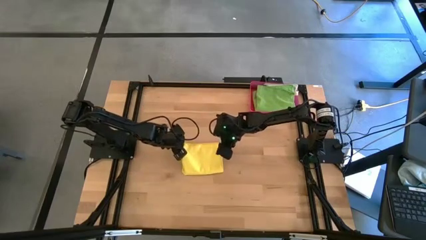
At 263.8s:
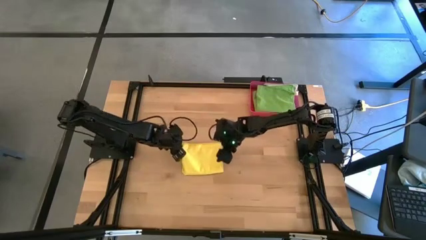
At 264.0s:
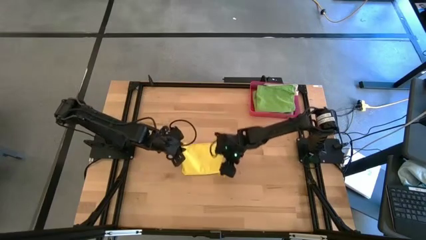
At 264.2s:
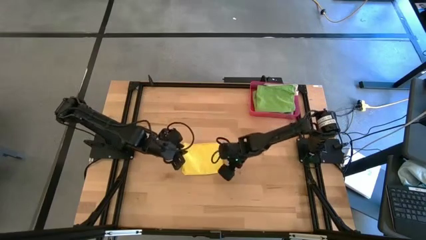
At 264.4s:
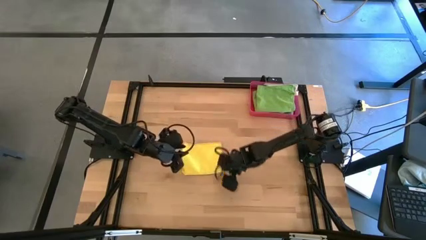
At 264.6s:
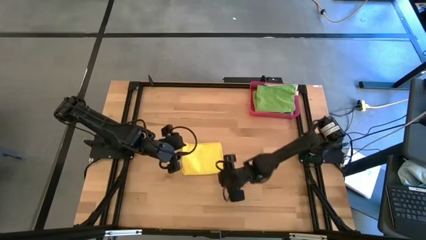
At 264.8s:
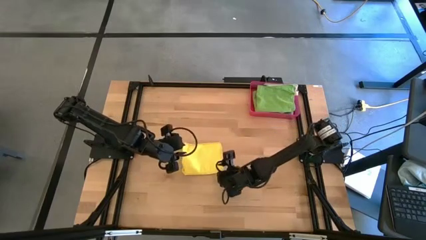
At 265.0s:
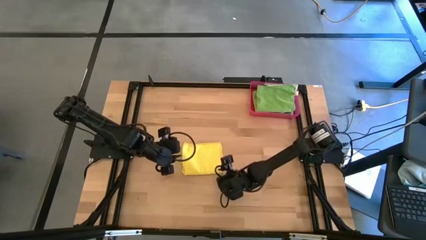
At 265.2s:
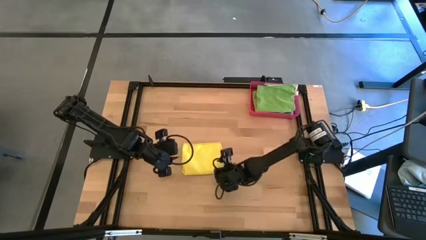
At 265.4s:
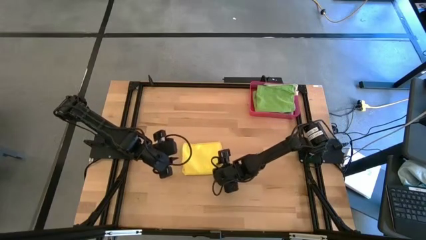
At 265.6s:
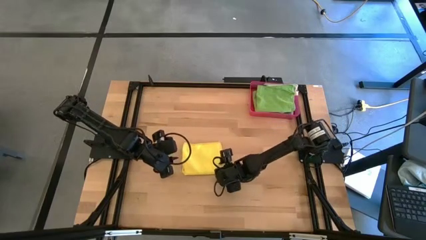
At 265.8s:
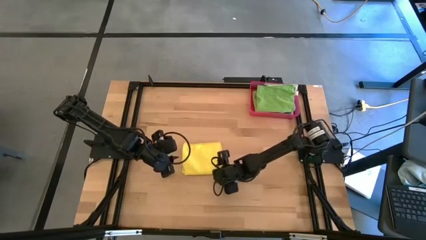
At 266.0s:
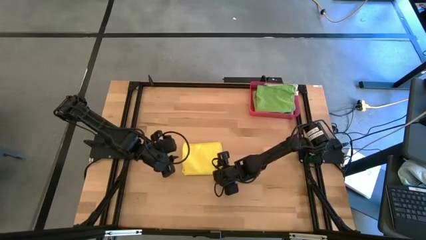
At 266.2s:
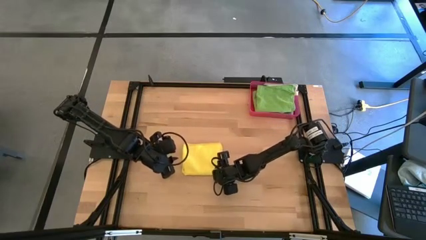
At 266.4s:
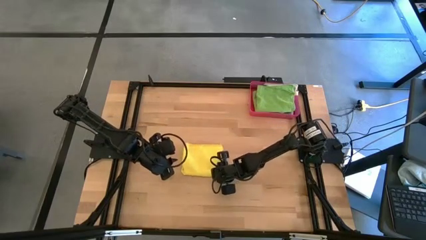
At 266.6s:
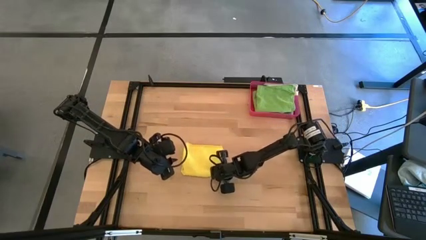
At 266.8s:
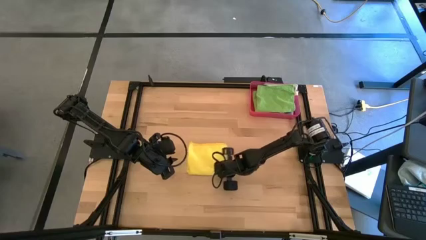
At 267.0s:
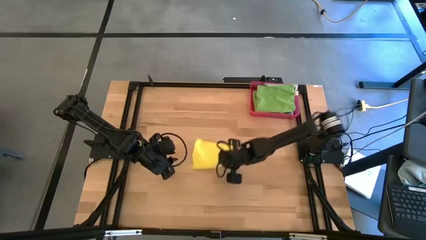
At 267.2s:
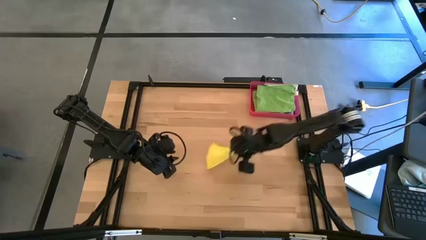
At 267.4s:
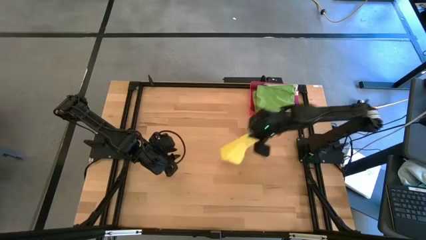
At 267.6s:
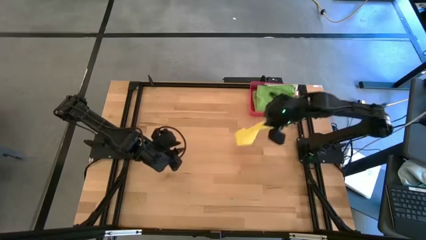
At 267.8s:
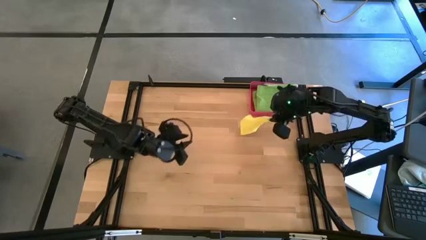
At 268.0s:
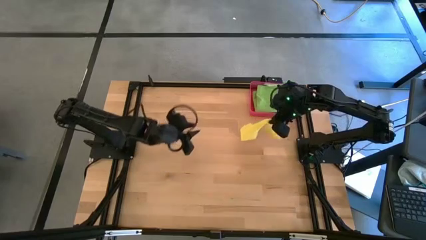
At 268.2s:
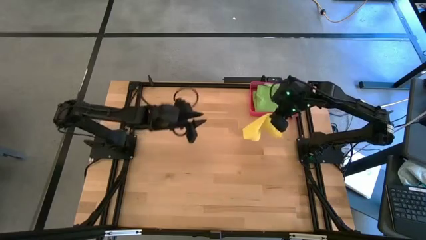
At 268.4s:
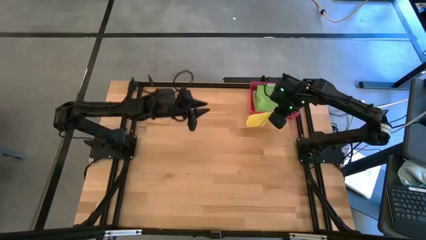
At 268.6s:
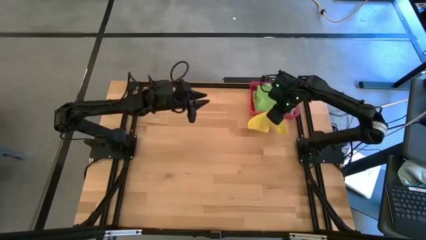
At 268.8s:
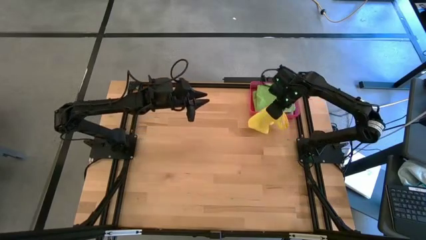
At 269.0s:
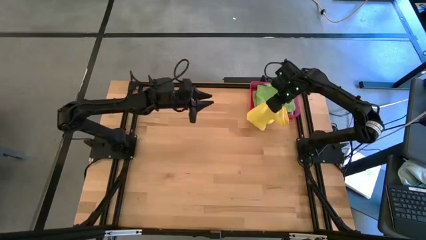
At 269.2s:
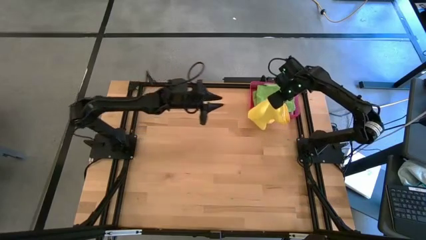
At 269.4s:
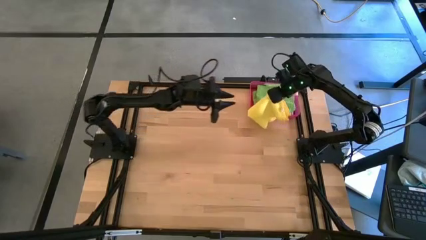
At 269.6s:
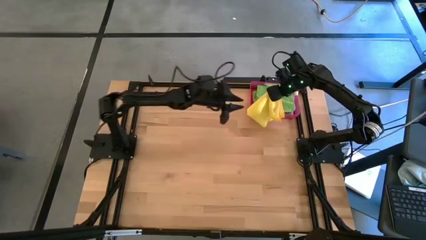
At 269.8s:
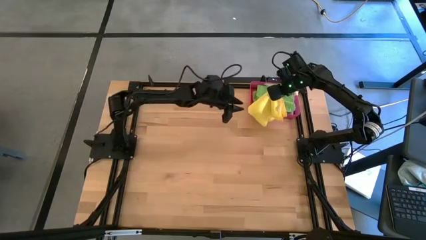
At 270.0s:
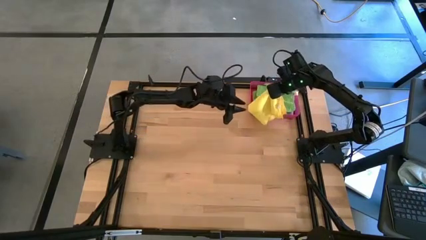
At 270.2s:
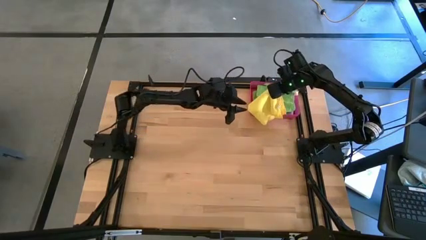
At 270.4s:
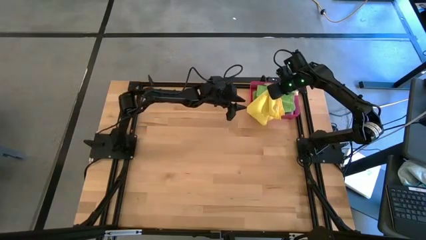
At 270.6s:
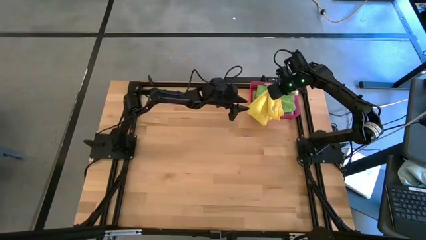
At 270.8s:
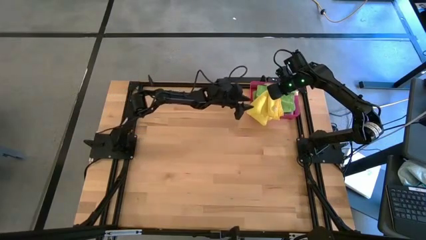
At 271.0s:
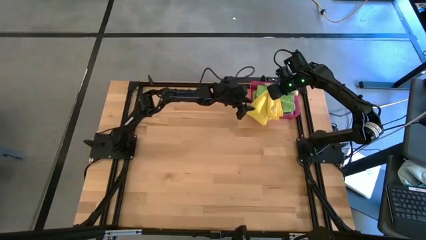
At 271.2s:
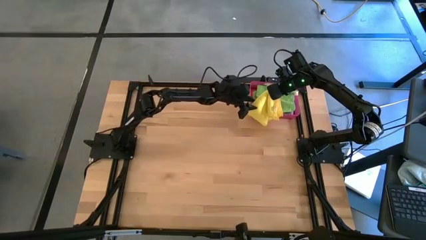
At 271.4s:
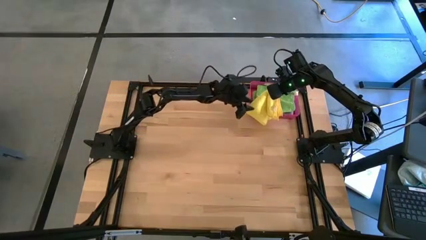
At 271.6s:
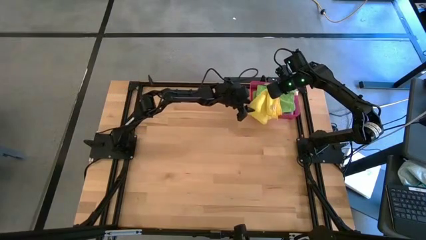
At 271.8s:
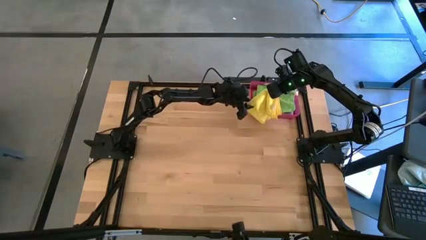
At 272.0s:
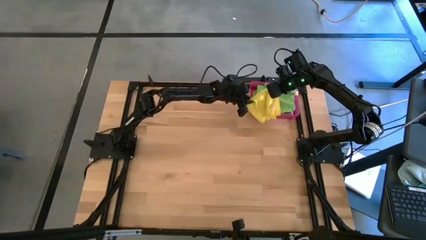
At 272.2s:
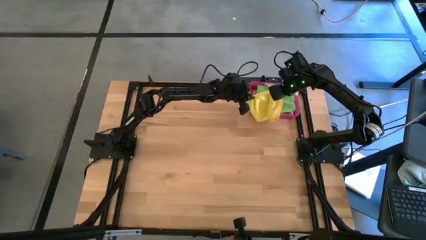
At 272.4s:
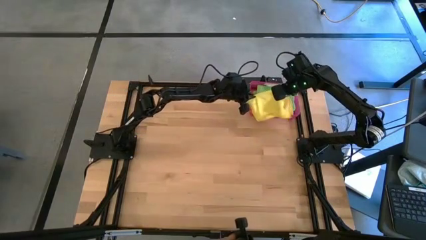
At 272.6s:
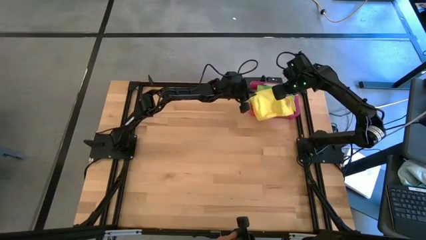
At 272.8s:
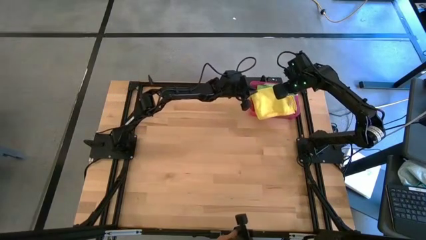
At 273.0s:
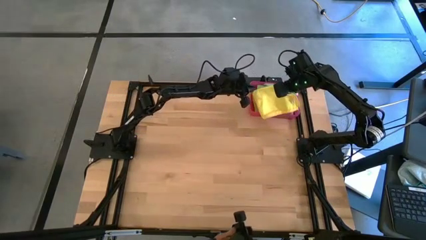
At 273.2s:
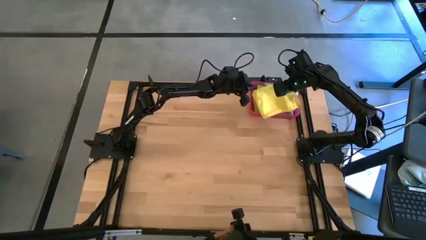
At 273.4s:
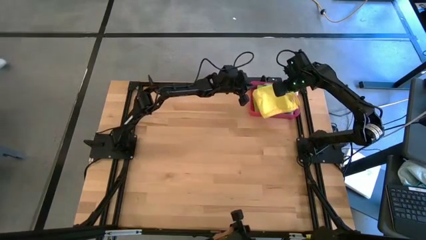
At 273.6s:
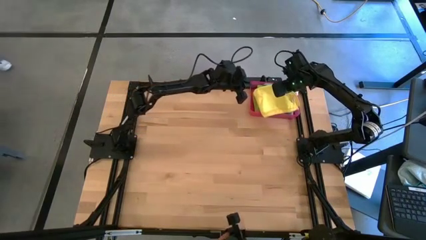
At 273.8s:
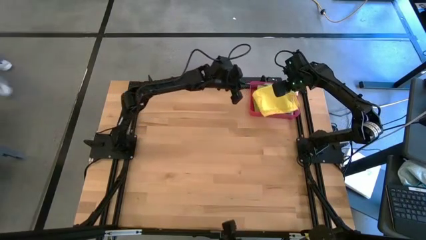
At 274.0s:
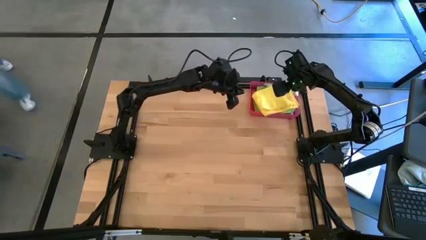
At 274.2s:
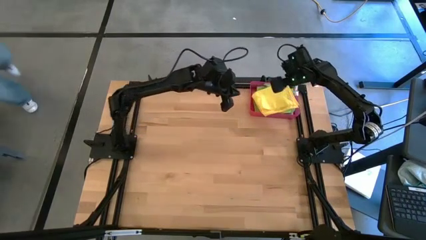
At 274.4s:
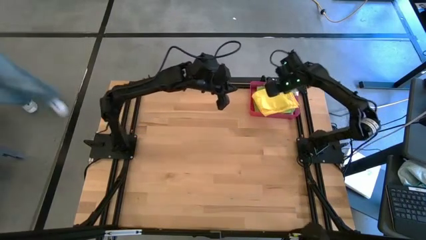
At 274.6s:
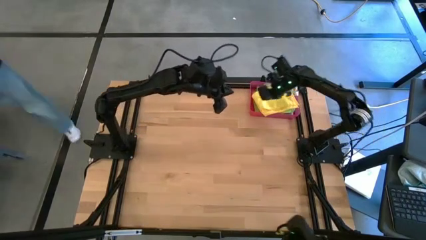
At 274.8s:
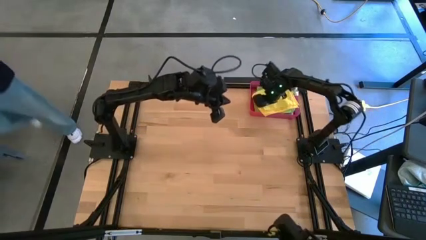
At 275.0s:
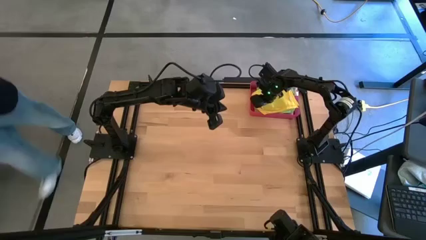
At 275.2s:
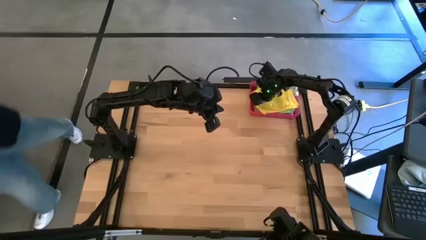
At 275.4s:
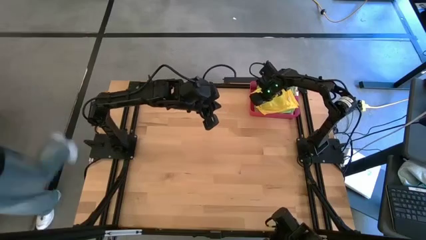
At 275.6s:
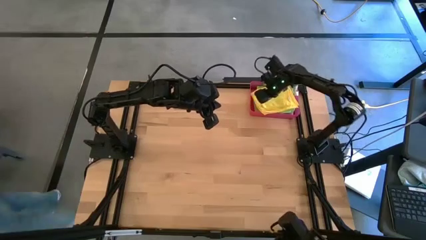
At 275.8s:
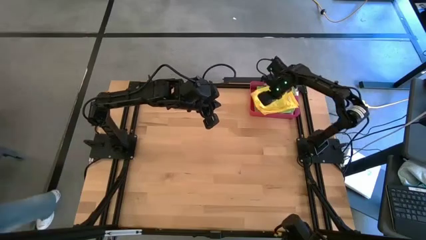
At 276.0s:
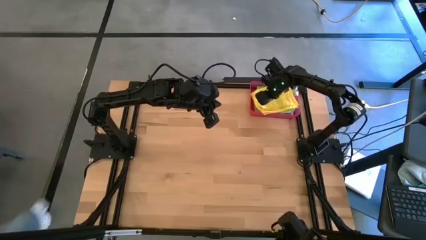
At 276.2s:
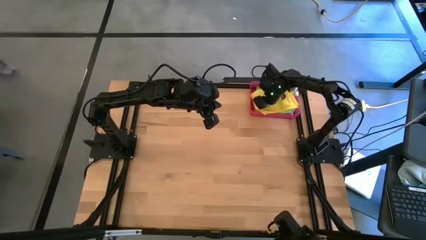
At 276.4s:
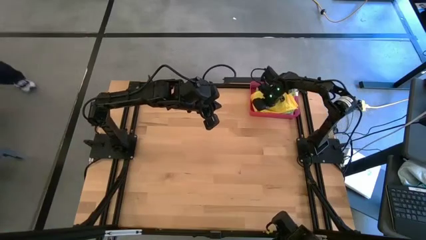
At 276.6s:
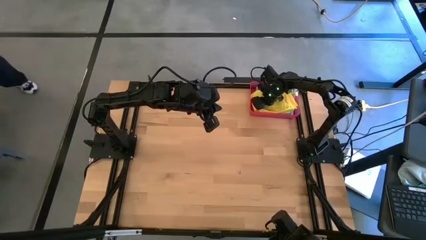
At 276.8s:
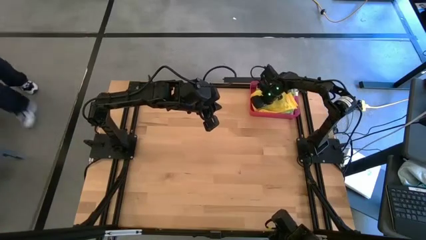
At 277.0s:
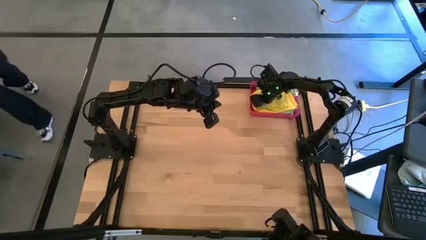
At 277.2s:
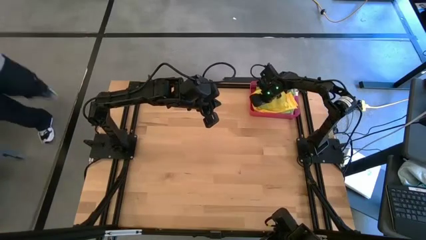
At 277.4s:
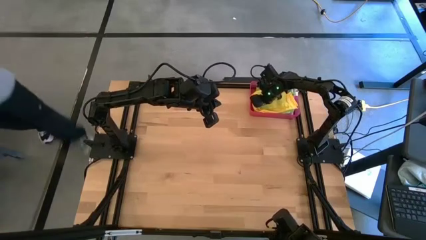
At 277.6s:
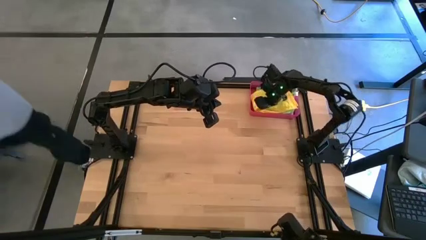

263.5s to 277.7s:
Task: Fold microfiber towels
Put the yellow towel into the red bin

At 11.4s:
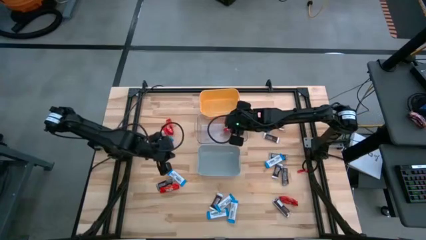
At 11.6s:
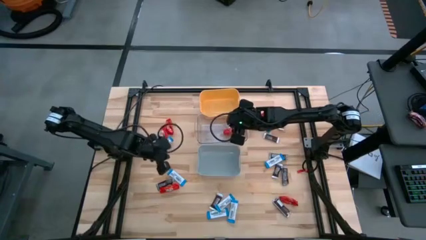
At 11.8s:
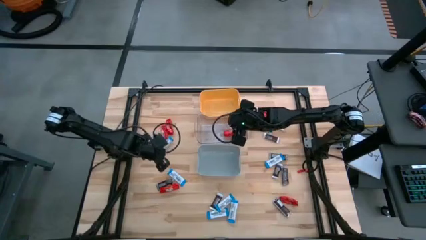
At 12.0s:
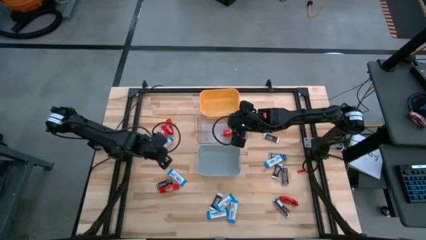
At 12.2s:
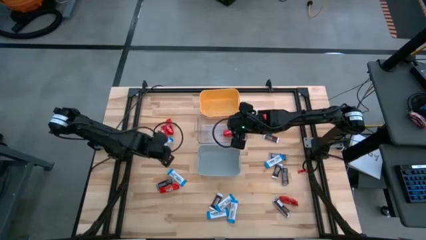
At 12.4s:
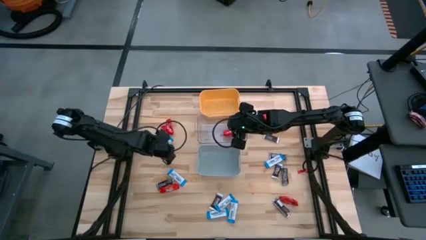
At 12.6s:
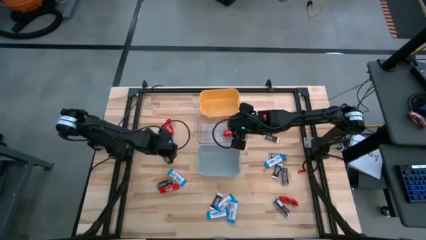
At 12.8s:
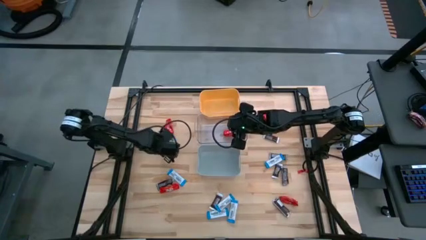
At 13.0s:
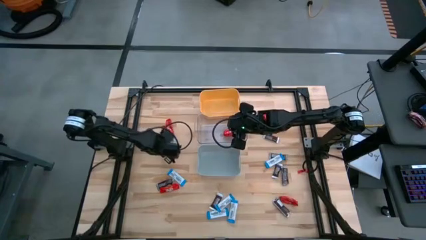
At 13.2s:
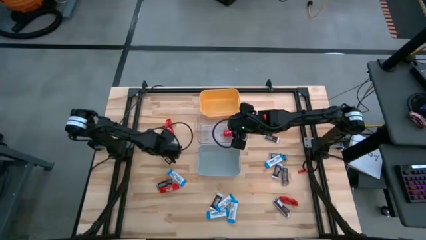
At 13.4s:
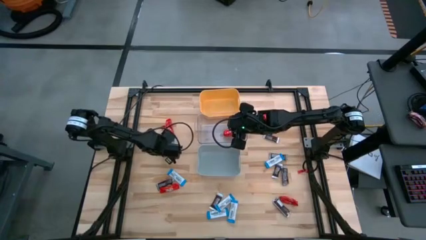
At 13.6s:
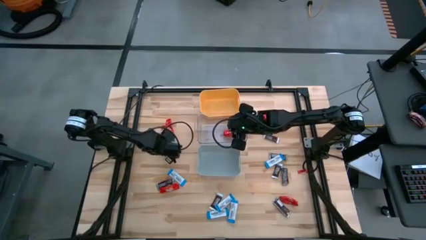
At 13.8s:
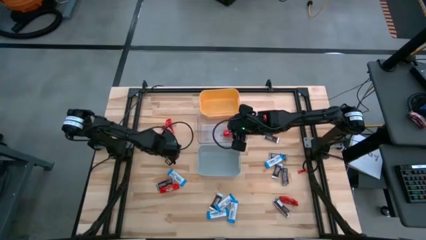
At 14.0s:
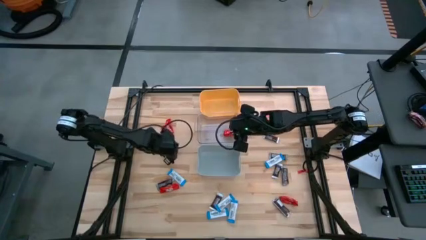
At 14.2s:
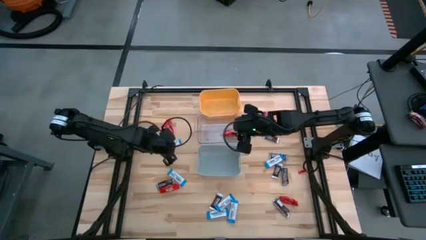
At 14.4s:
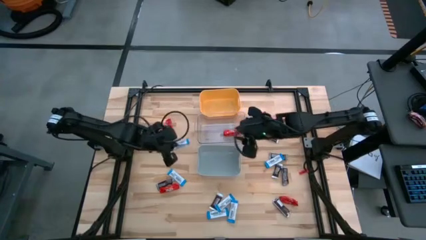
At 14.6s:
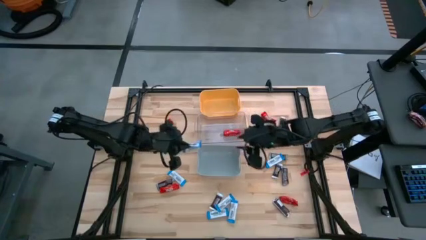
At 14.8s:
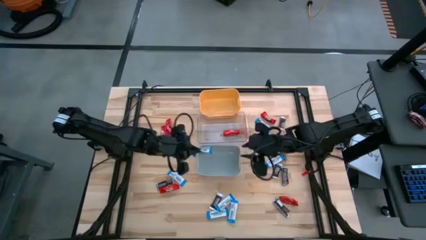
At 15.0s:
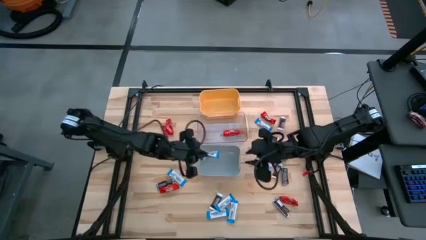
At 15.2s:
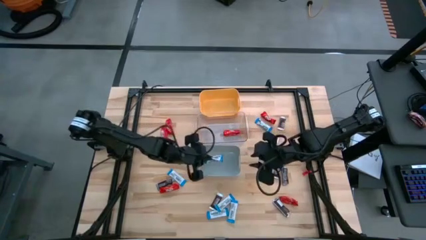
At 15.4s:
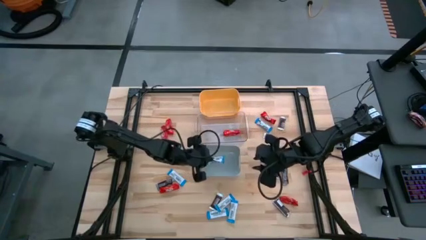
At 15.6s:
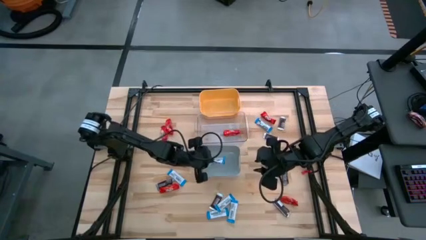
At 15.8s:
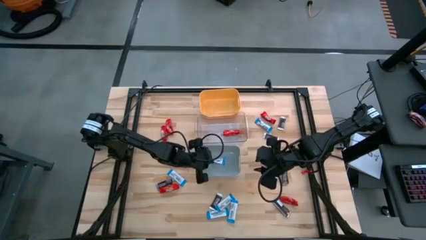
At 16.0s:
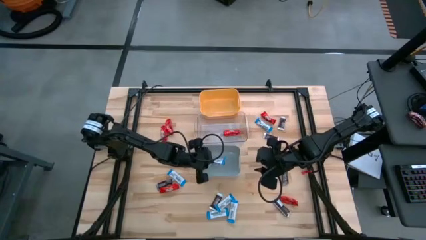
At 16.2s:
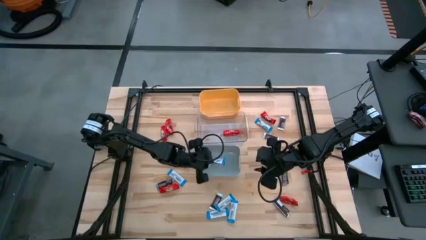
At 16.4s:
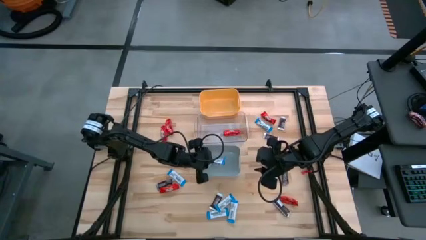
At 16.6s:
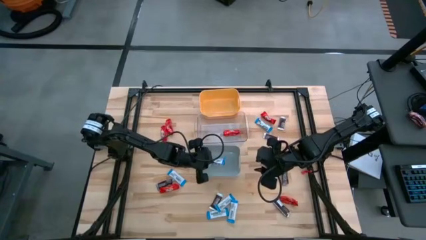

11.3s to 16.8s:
Task: Organize candy in baskets
Put the white chocolate bar into the gray bin
